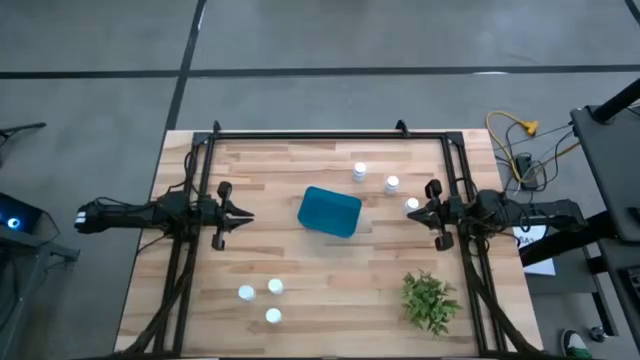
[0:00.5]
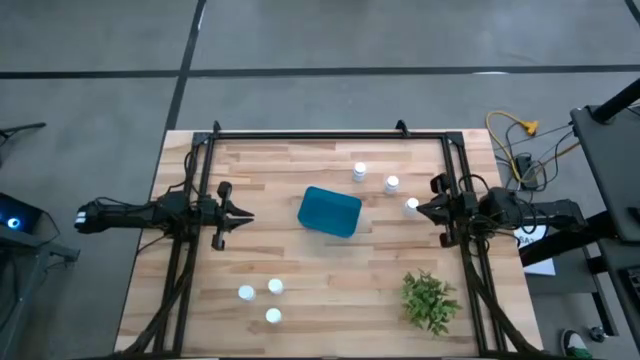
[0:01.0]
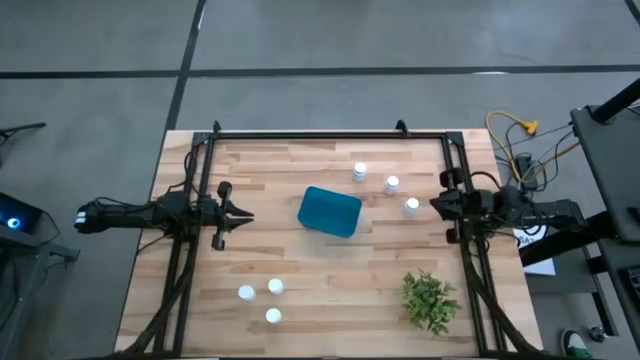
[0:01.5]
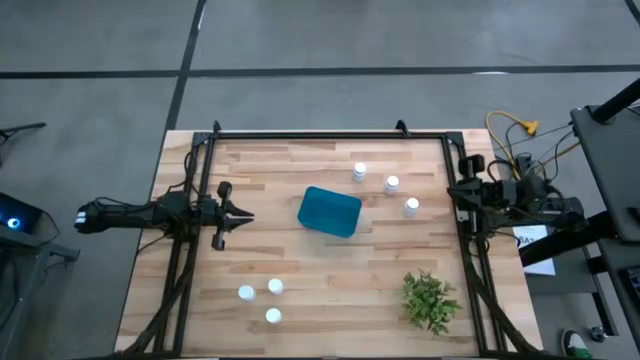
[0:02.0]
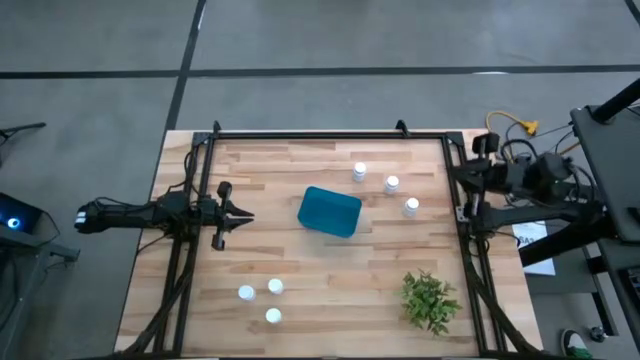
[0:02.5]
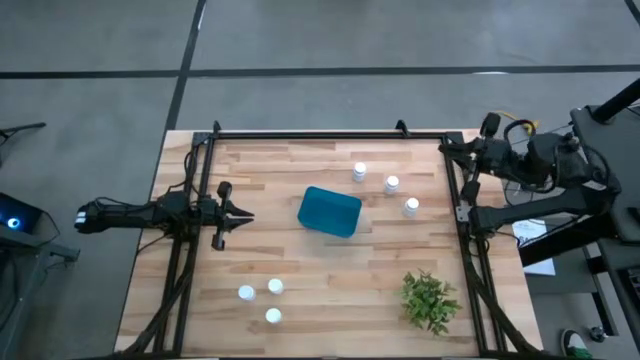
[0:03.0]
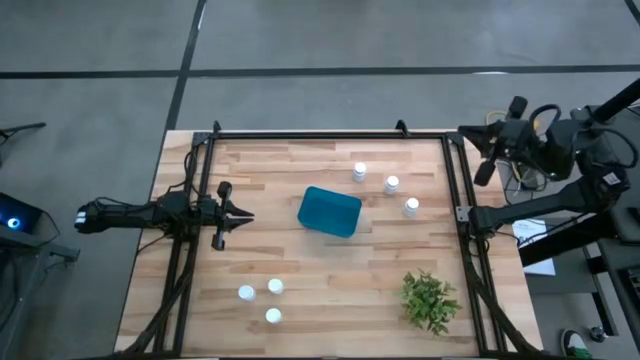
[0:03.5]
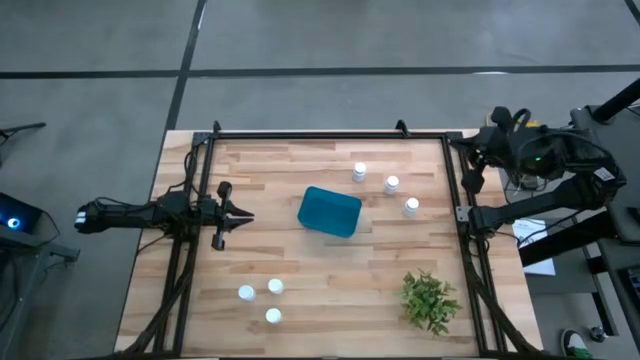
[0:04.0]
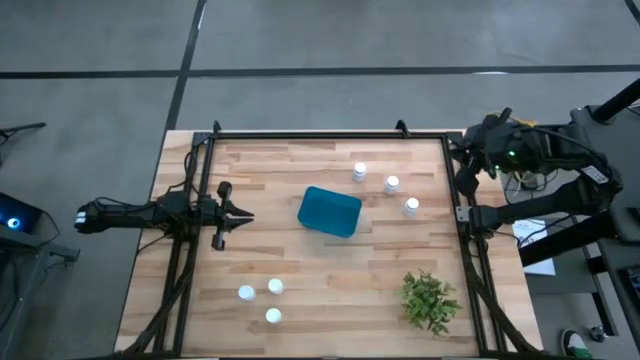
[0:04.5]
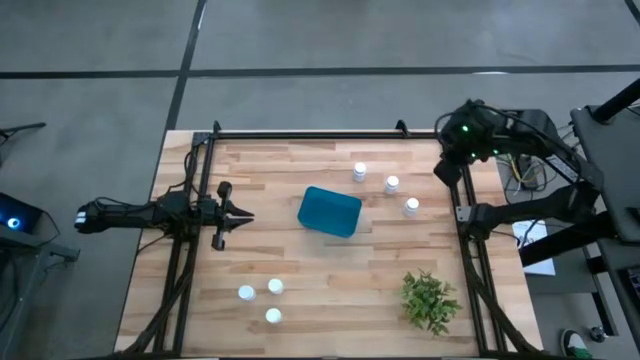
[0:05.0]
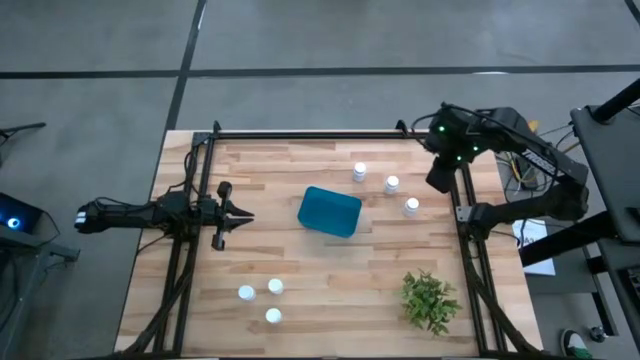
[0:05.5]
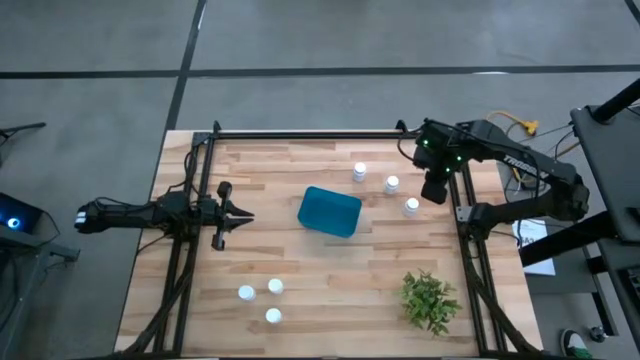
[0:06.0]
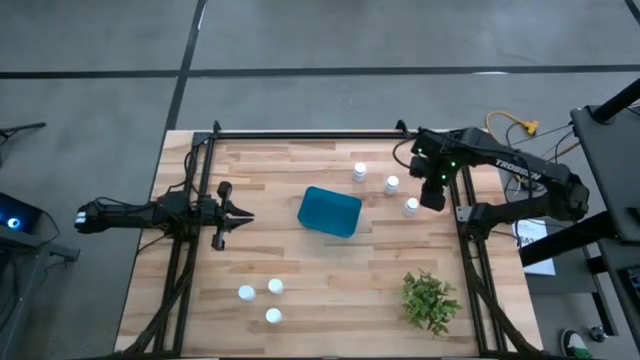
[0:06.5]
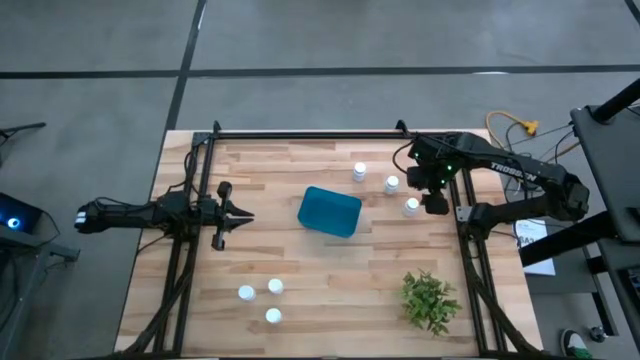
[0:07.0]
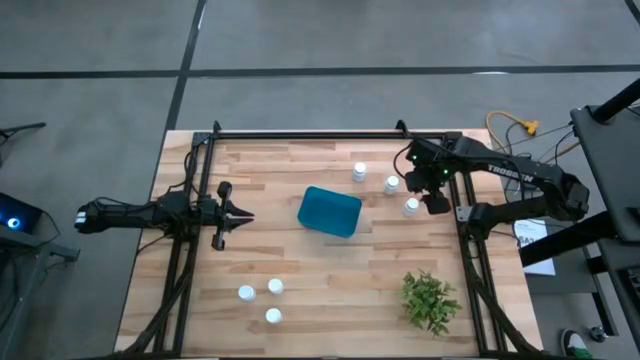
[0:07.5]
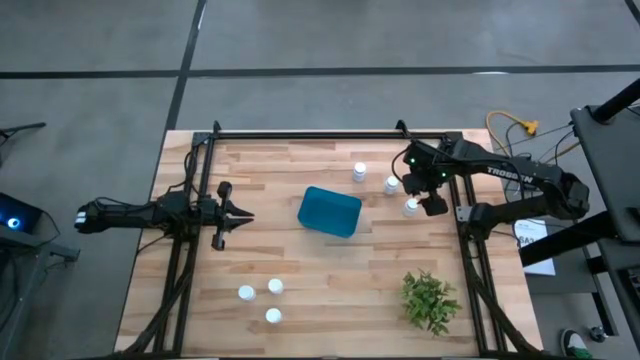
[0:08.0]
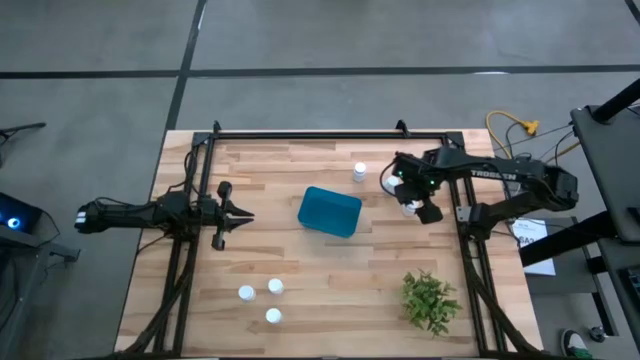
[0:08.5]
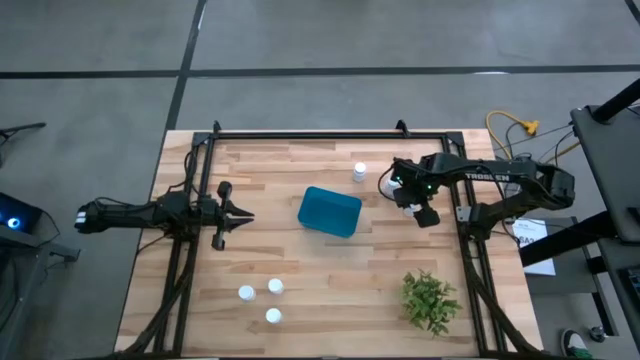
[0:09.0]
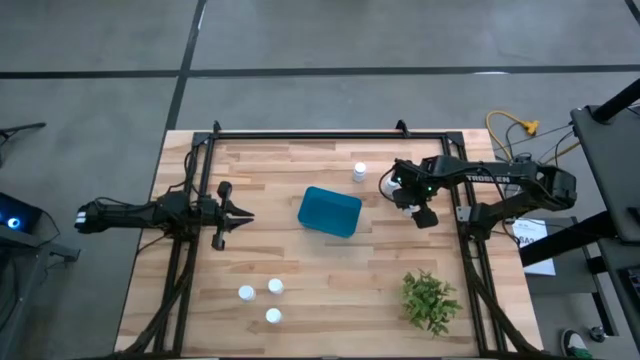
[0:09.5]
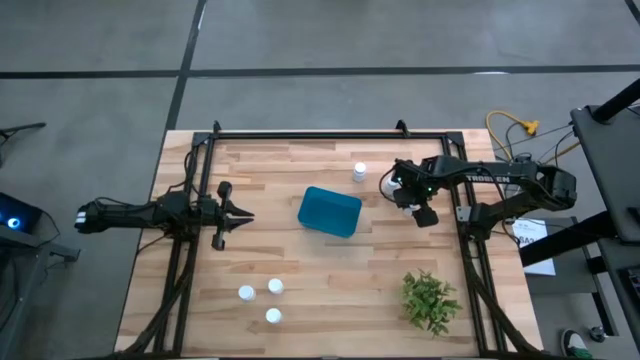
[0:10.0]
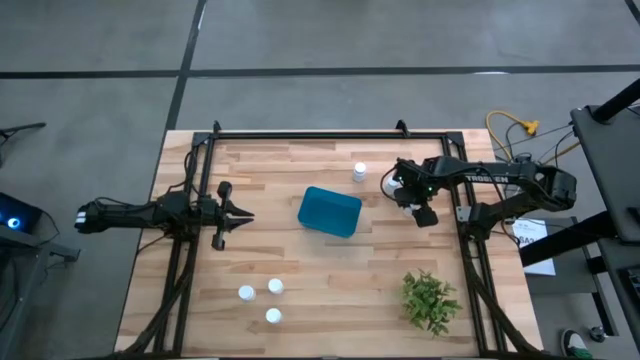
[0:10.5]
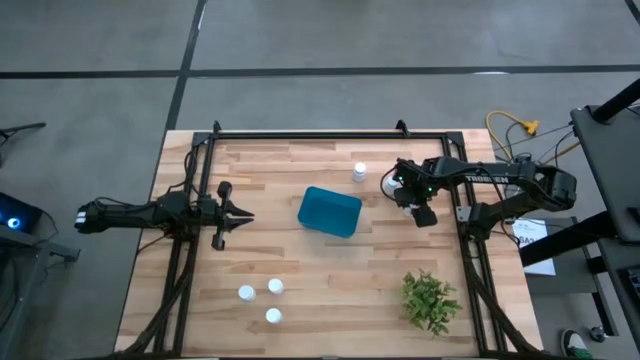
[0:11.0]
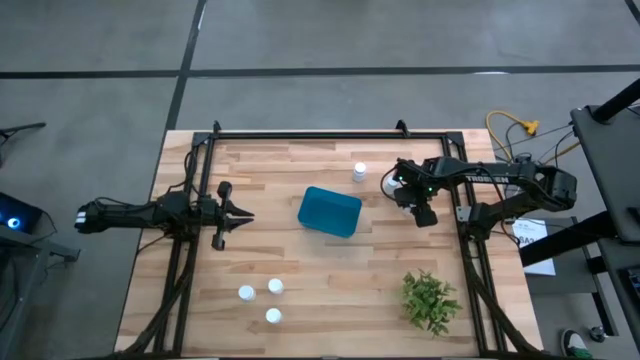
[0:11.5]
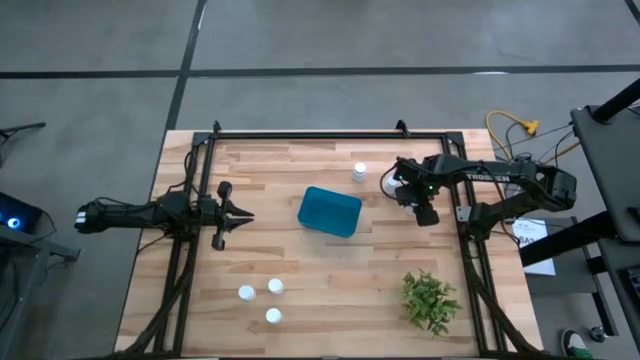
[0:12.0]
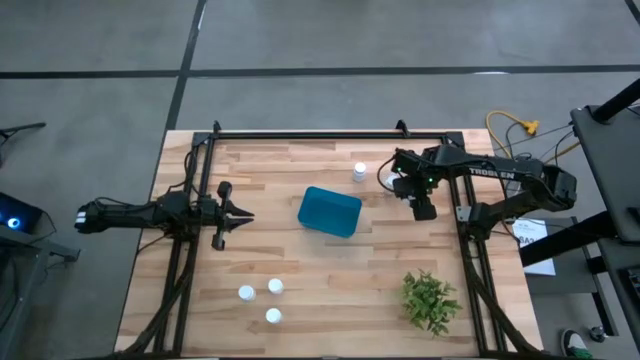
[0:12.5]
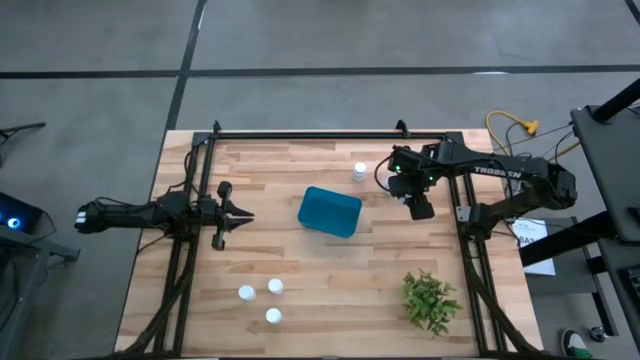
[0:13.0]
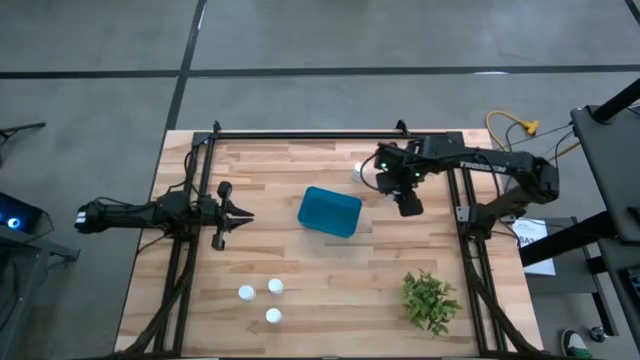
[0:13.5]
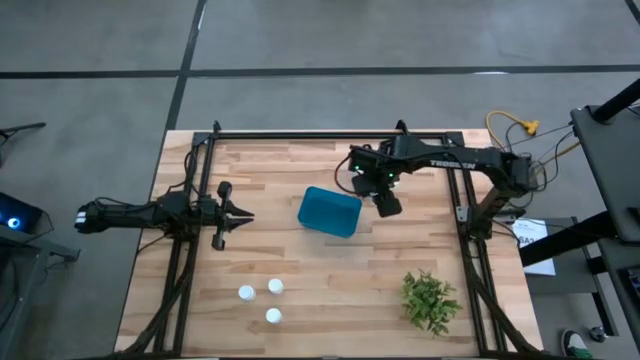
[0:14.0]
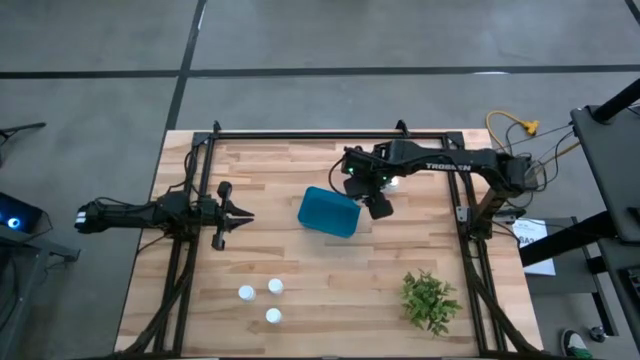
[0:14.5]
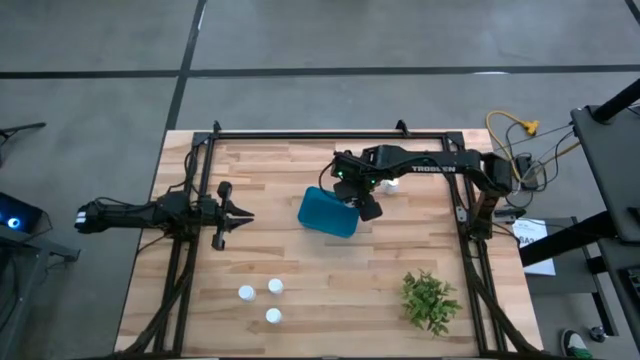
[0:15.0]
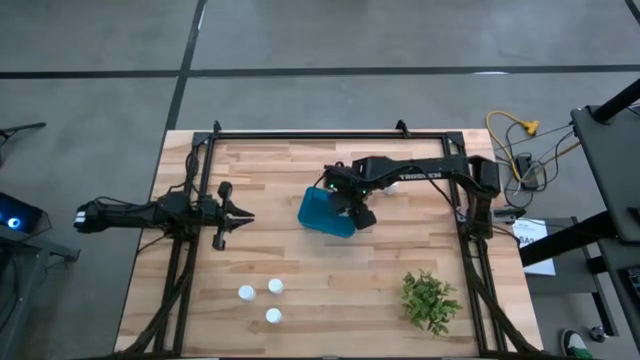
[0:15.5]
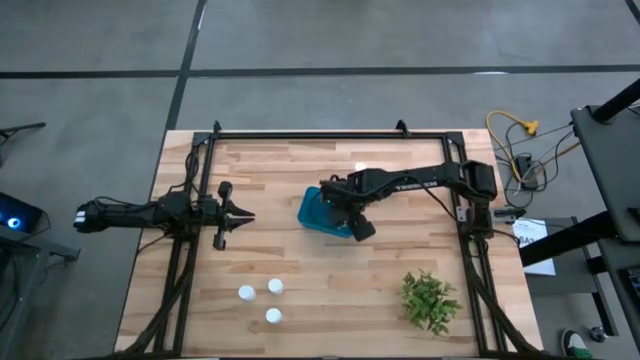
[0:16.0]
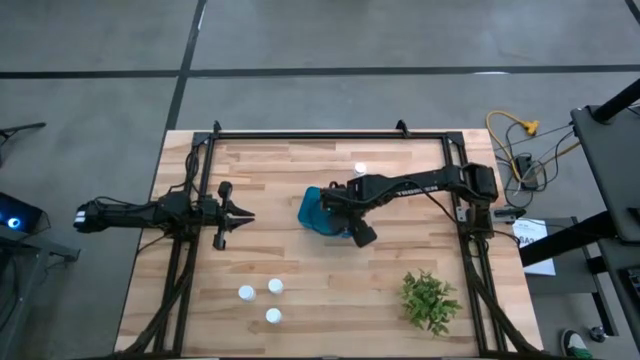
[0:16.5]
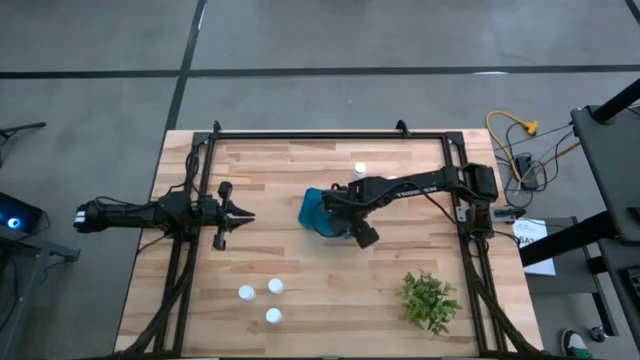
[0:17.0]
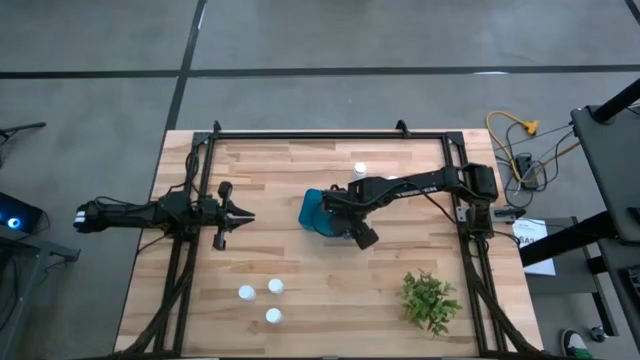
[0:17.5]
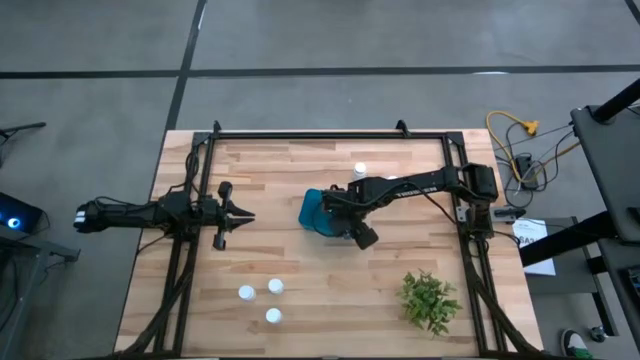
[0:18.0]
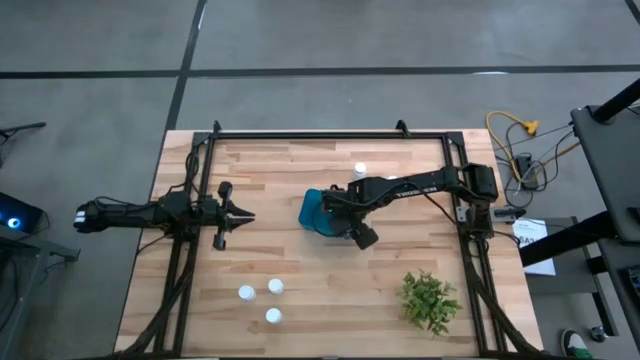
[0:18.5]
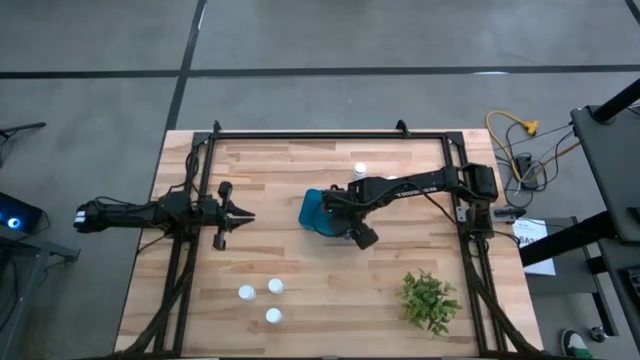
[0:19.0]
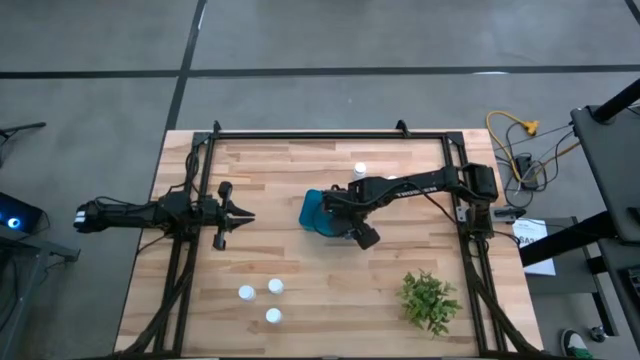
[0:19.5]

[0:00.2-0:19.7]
Task: Pick and place pill bottles into a basket
Put the white pill bottle into the blue bin
